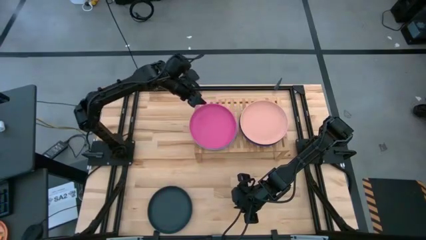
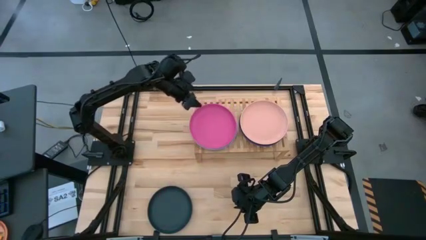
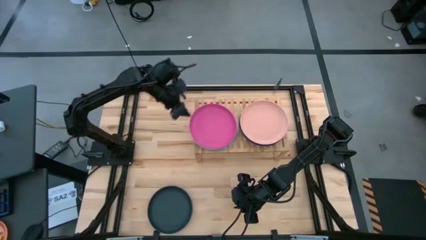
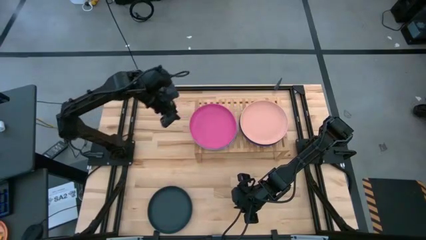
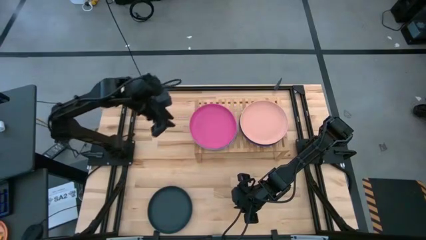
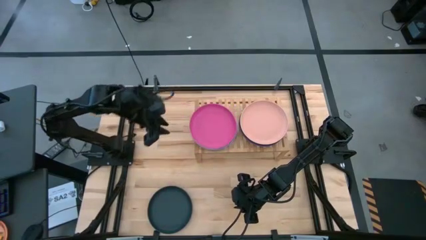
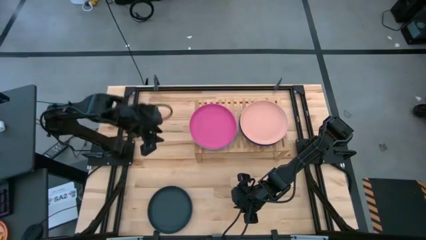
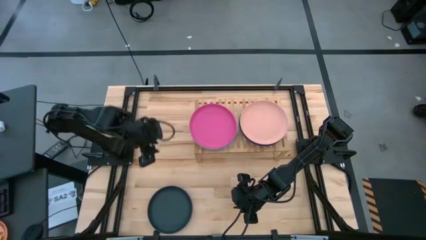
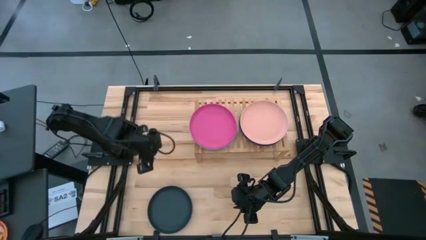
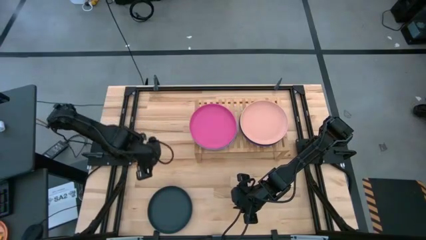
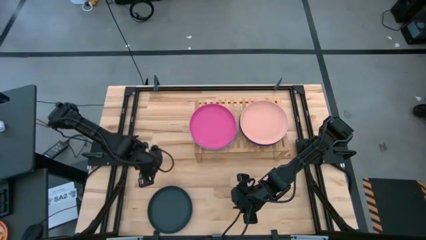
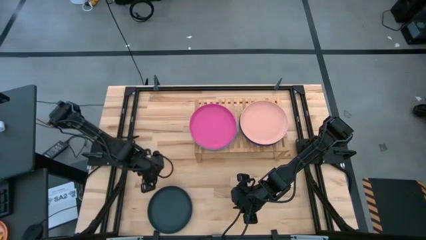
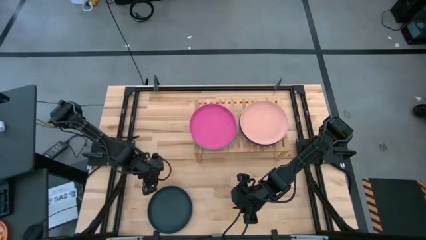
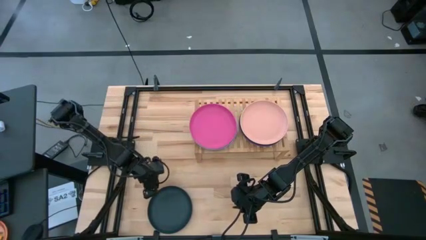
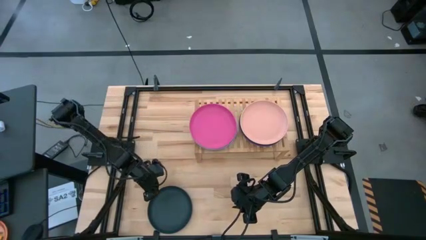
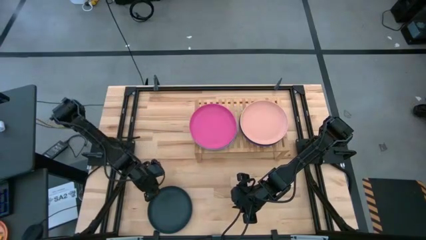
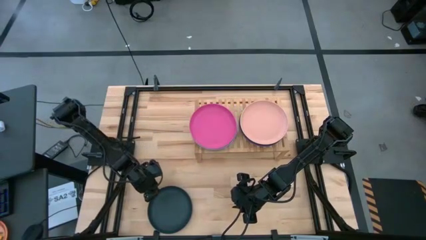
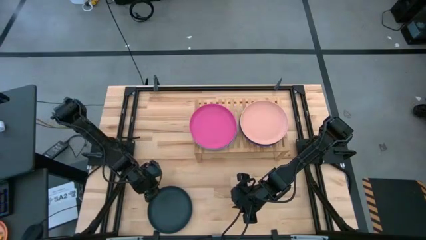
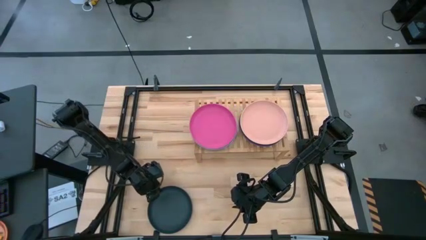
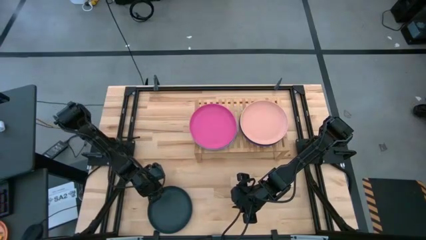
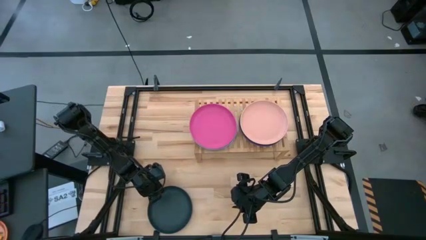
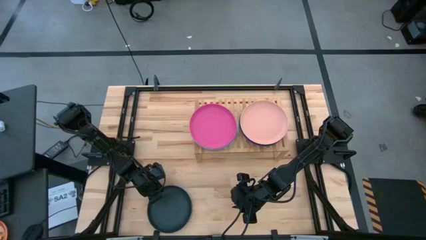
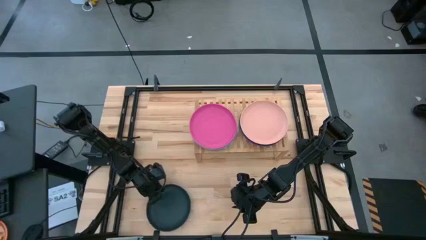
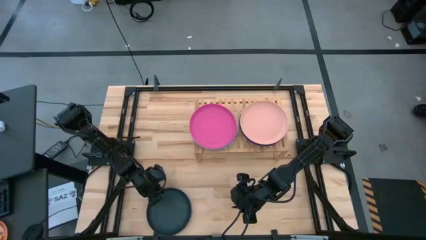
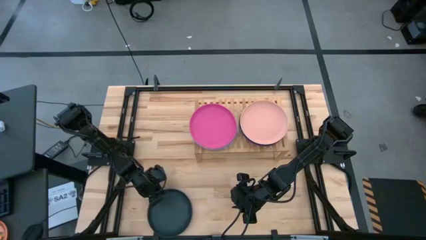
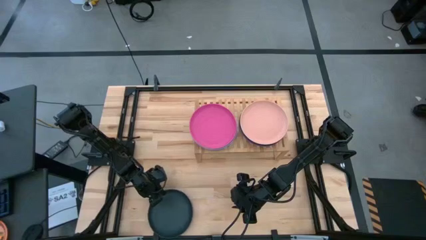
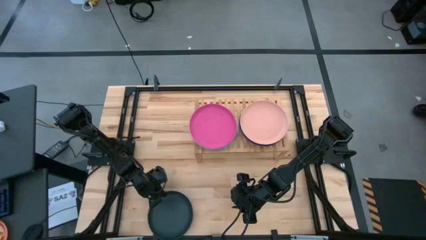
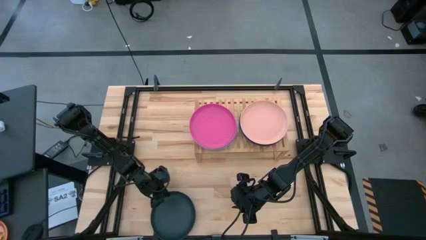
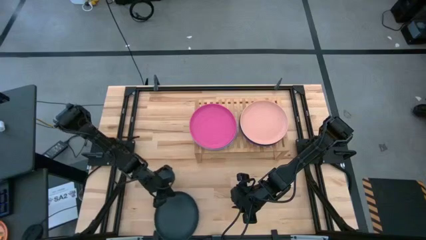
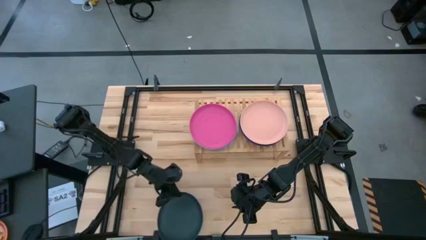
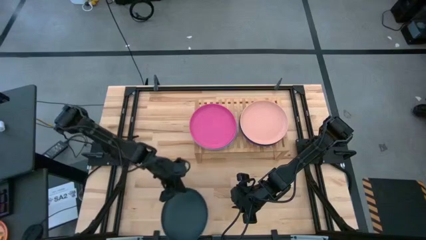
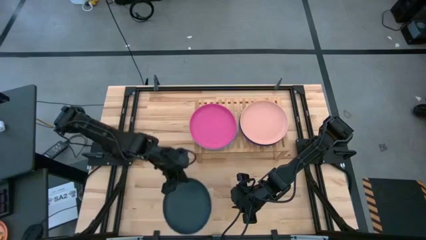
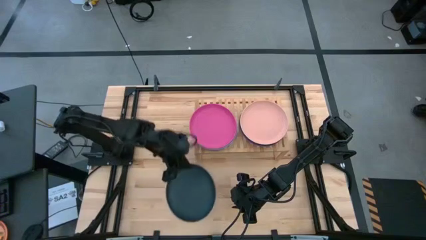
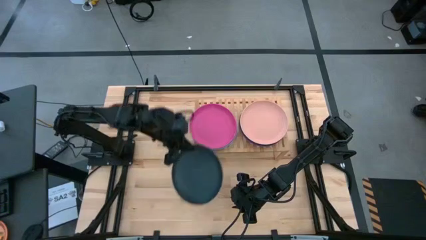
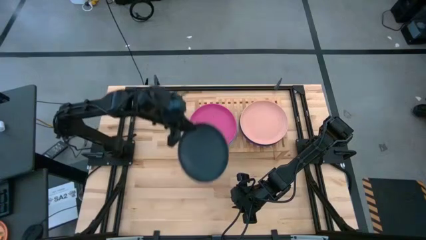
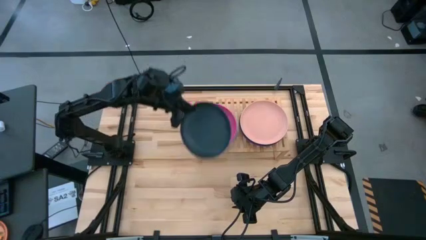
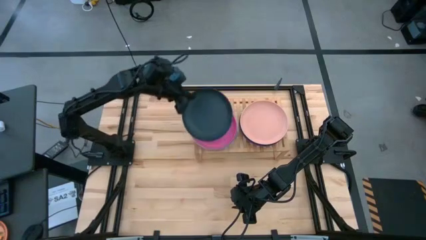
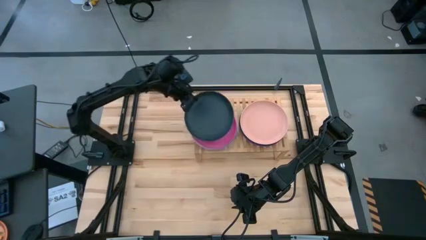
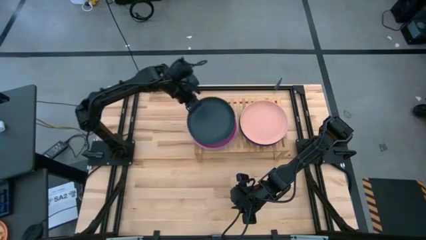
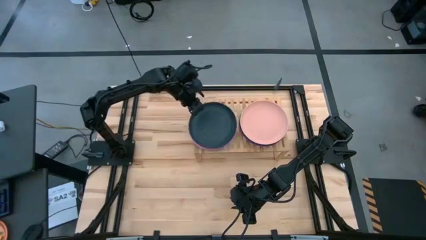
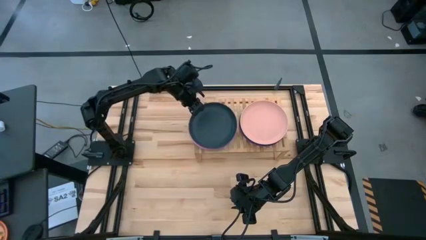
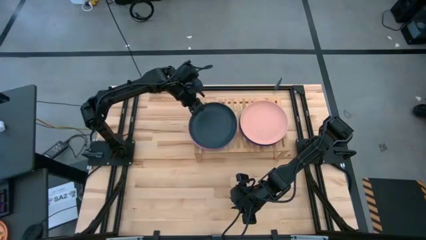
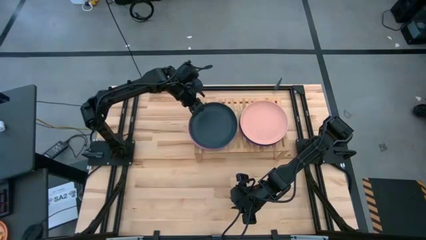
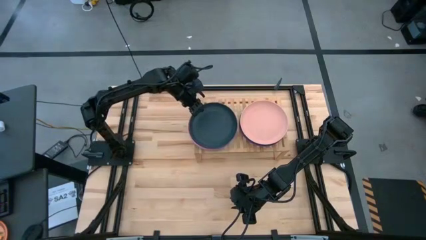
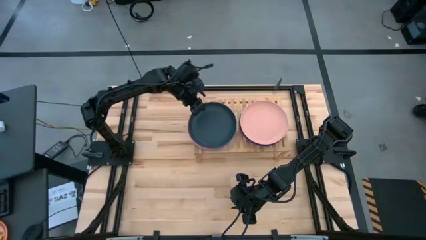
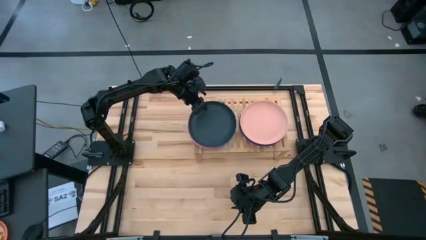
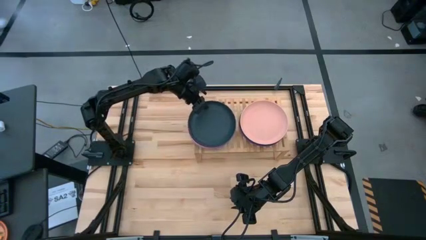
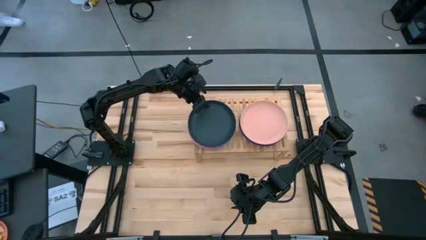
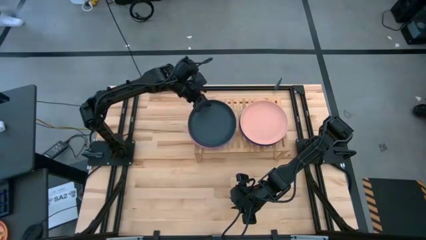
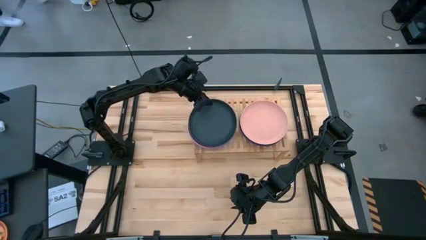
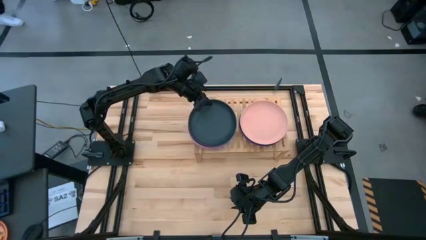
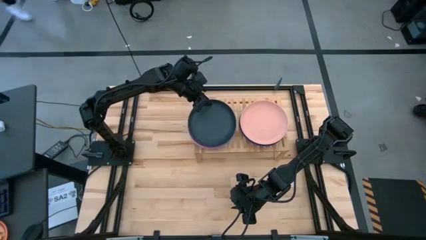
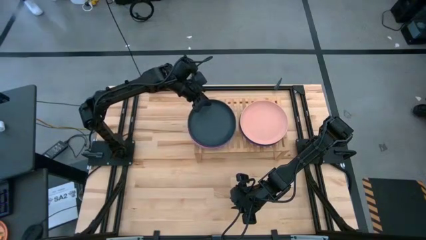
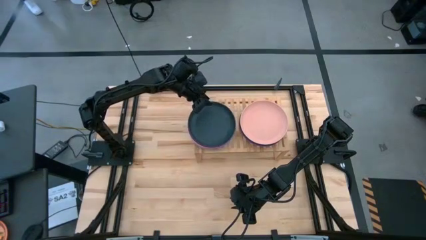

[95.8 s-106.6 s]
Task: Place and stack plates onto a shelf
Stack the black plate on top of the pink plate on the shelf

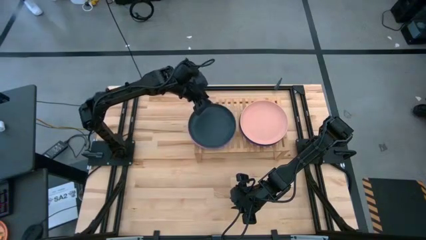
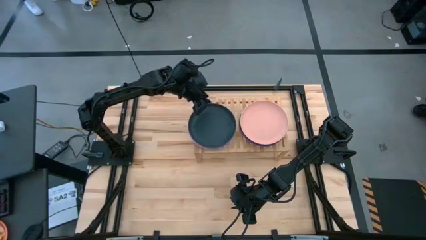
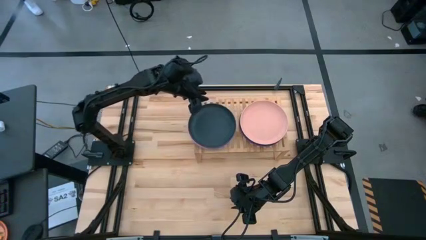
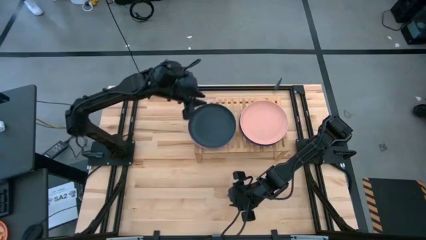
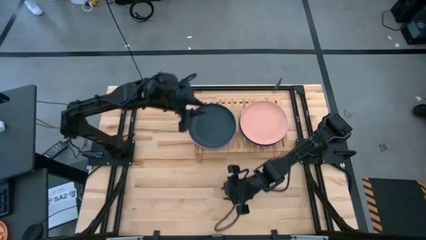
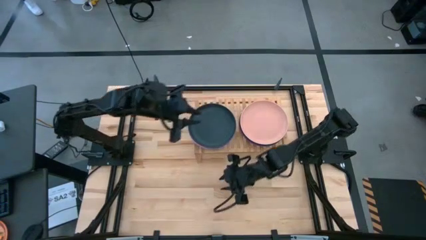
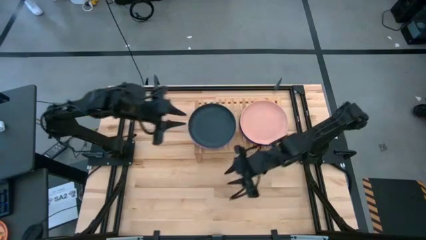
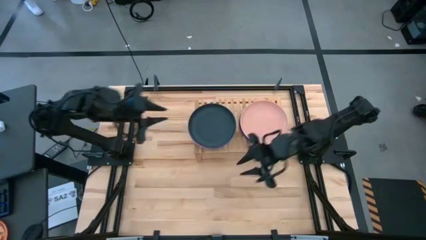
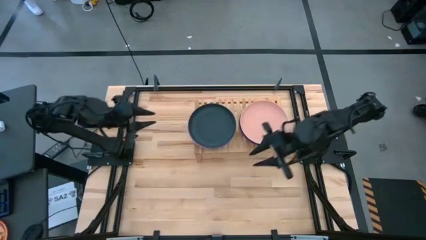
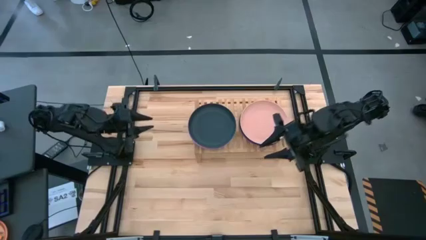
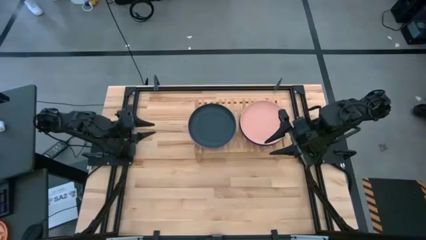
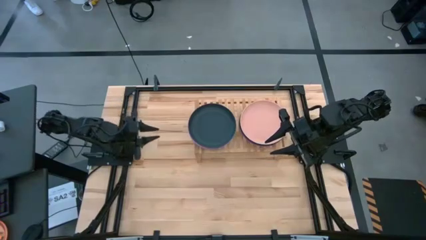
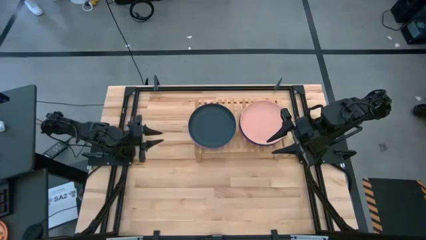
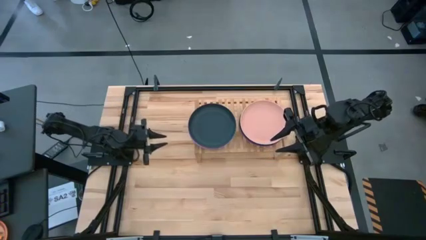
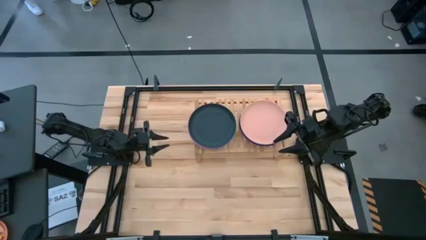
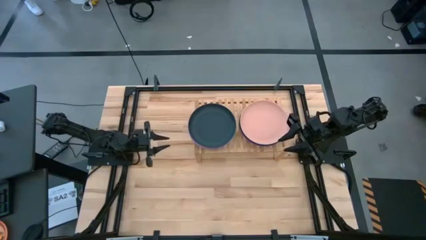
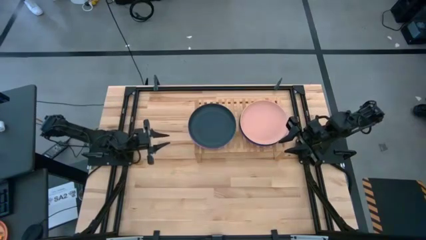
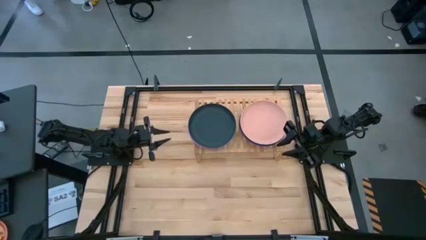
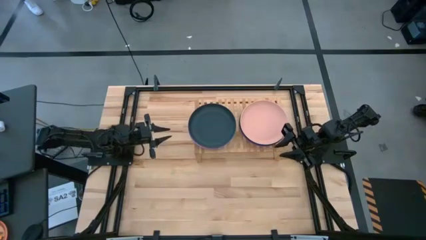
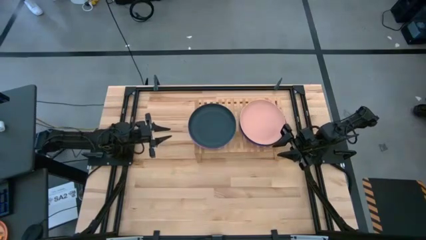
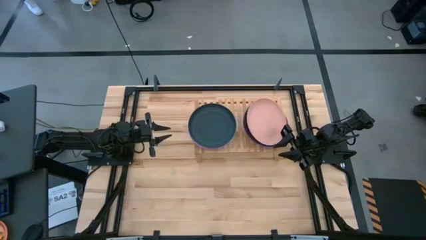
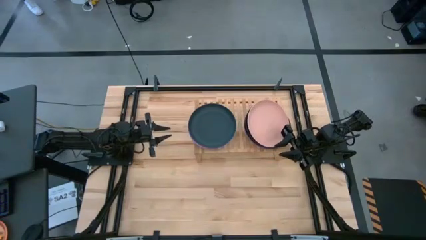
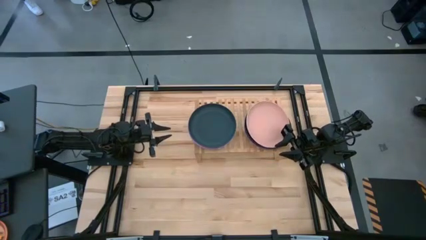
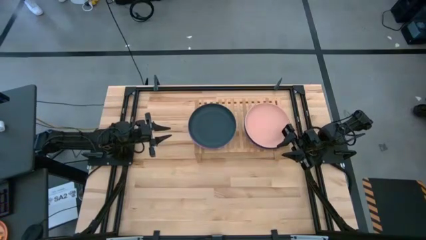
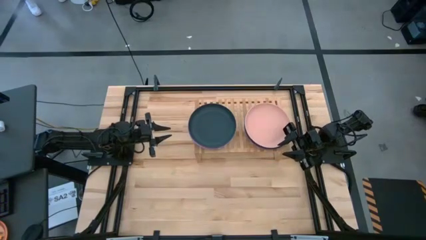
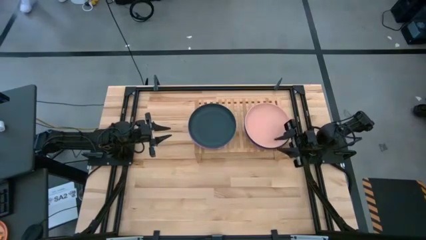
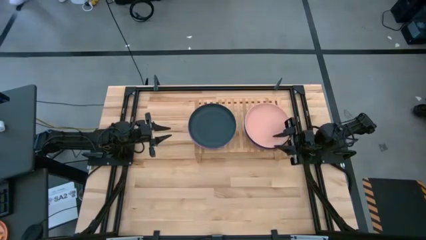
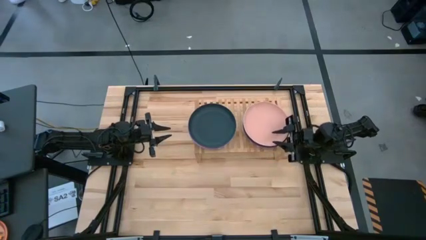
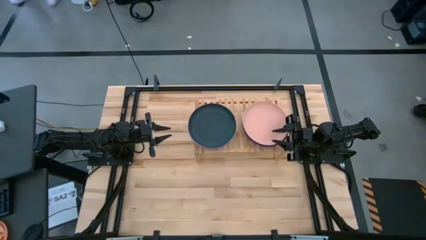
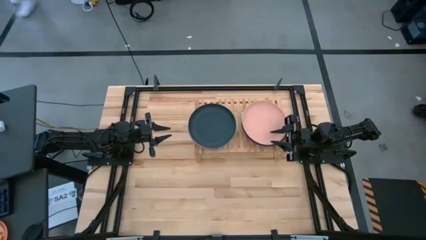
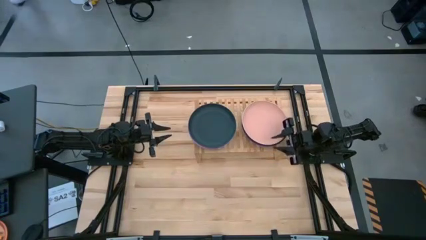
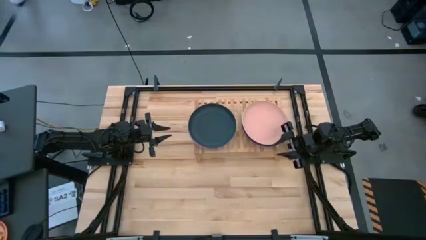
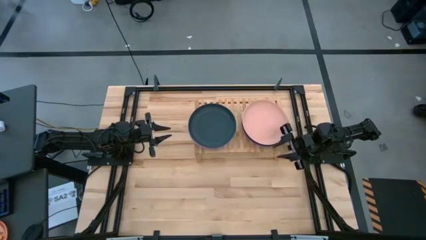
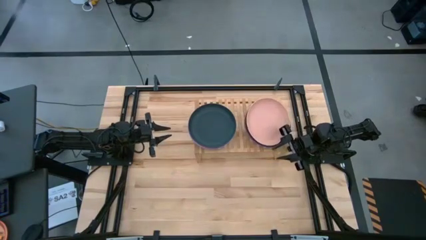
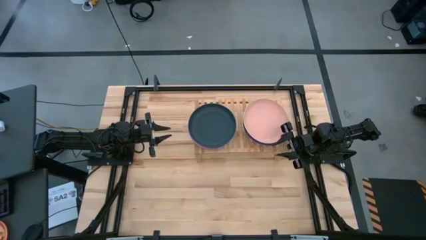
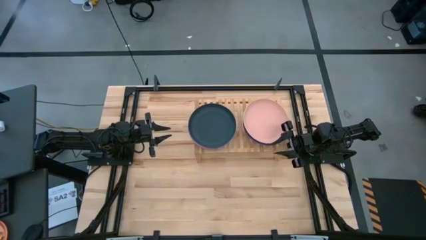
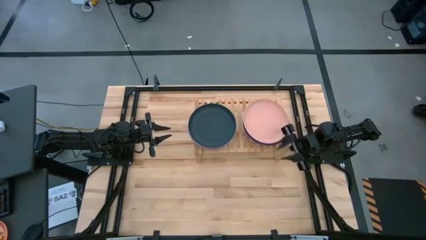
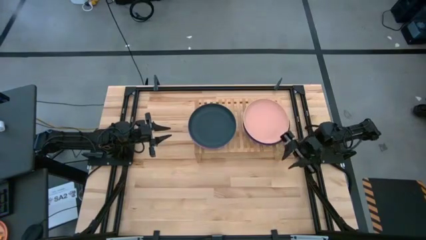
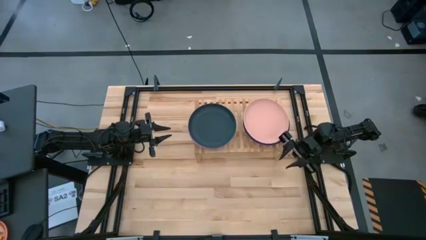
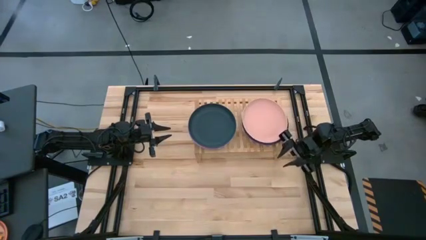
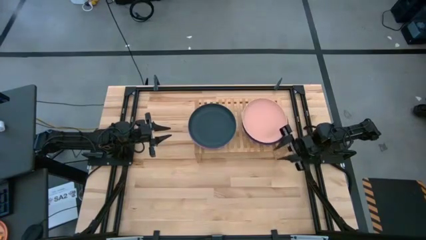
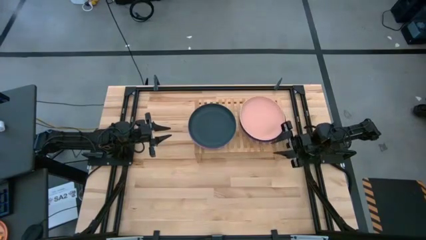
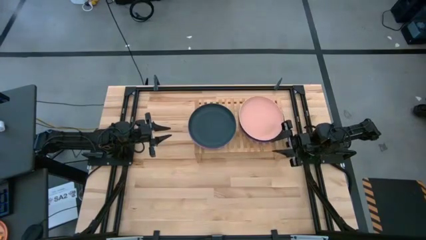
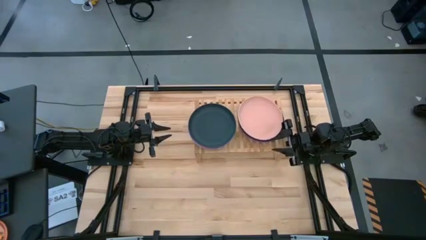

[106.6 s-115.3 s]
Adjust the right stacked plates on the shelf
